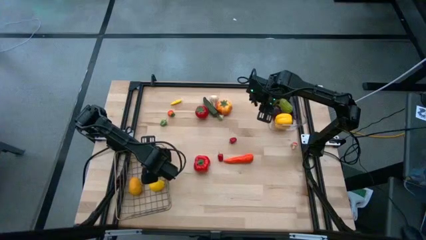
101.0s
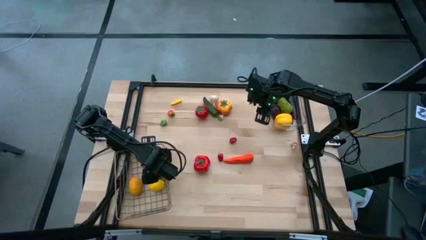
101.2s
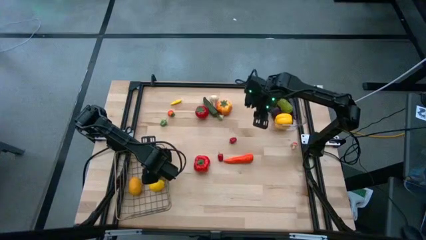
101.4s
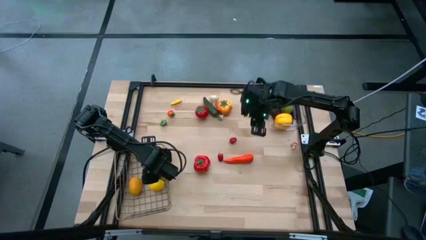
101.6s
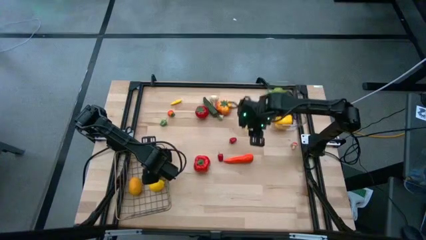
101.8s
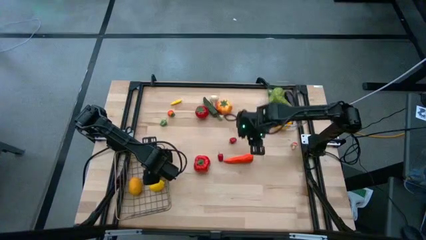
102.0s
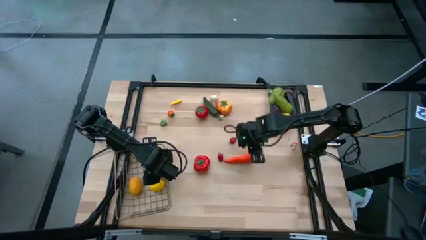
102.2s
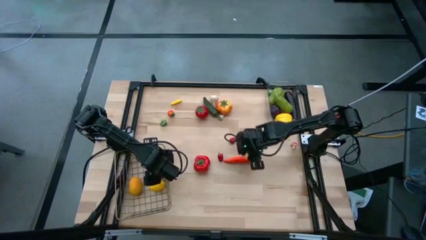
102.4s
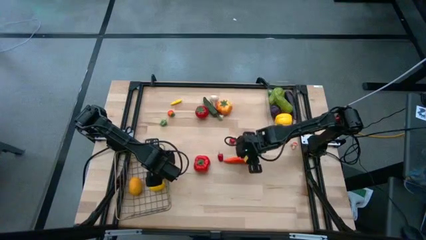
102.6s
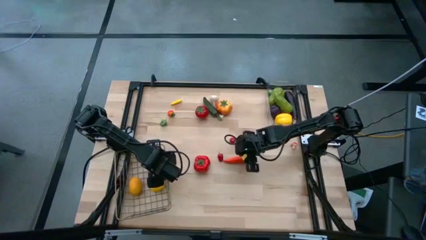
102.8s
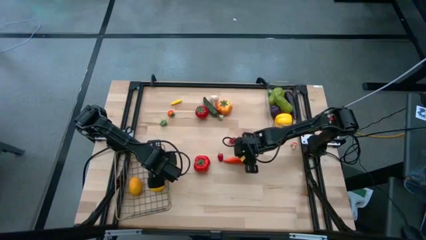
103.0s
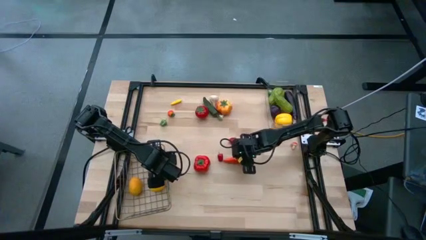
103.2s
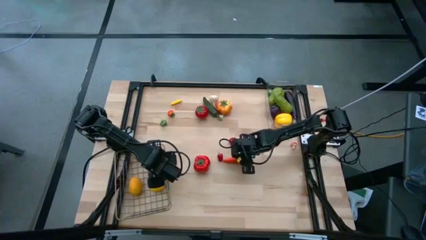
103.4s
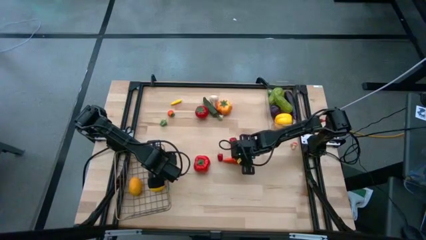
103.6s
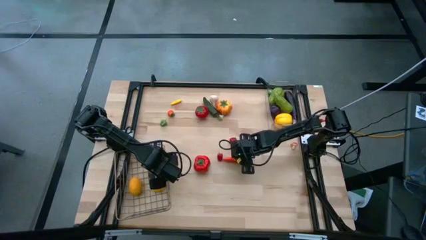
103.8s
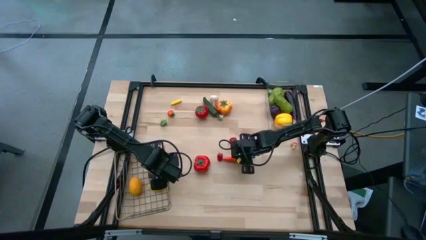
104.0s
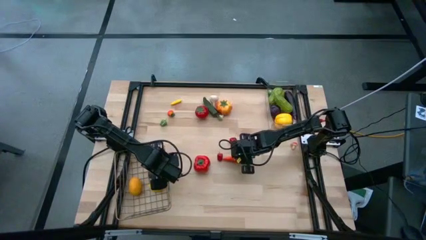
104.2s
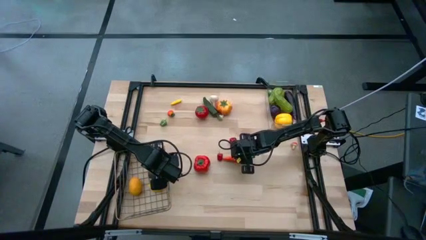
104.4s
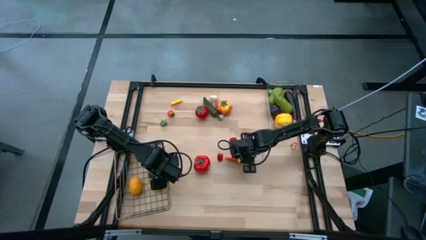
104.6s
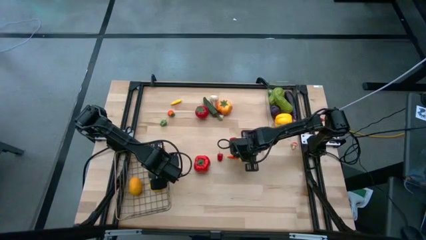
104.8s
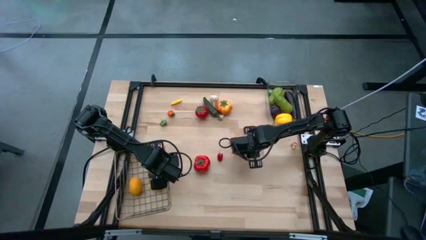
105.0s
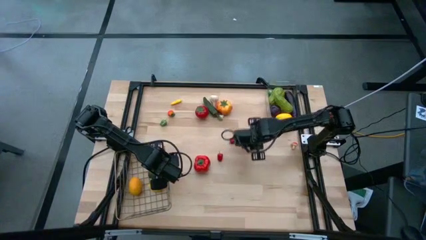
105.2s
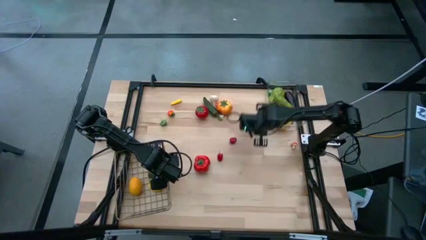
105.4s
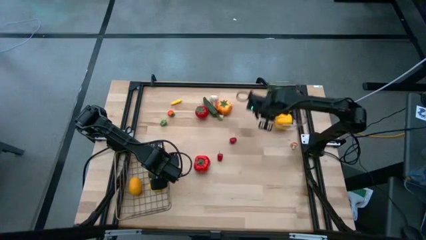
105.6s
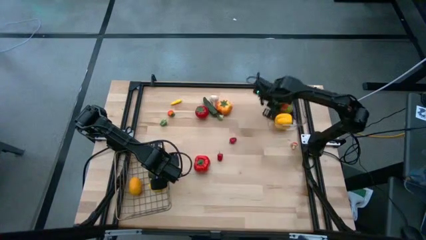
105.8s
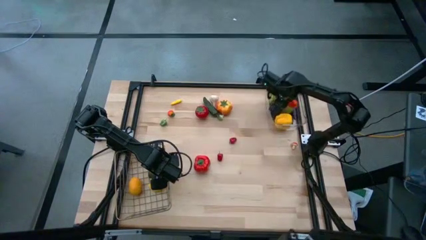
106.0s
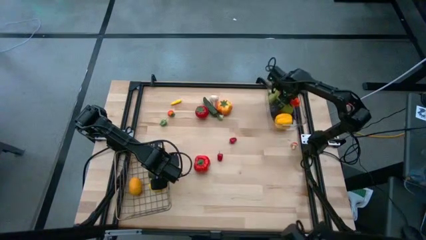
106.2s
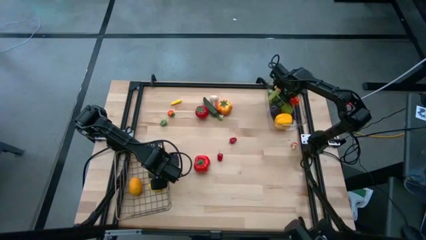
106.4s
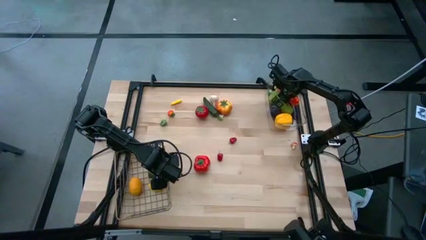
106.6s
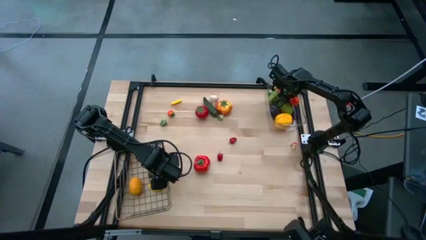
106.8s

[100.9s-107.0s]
Task: Sort produce into baskets
Put the orange carrot into the transparent bin

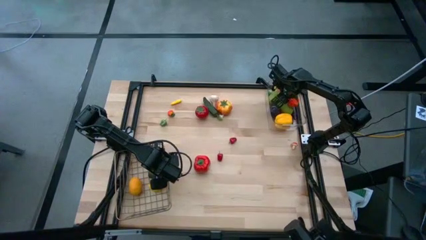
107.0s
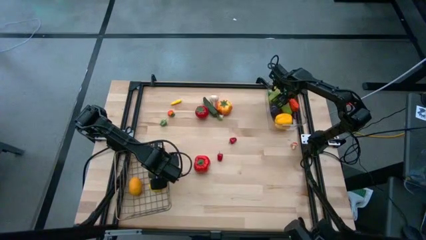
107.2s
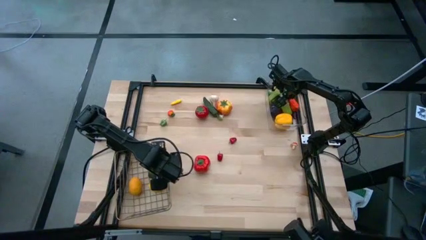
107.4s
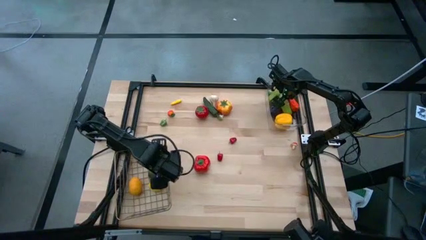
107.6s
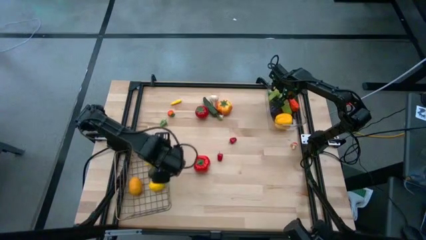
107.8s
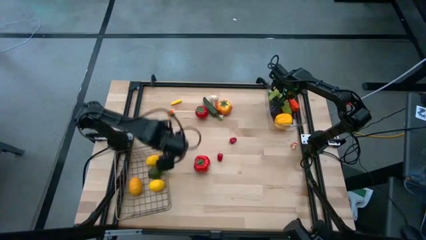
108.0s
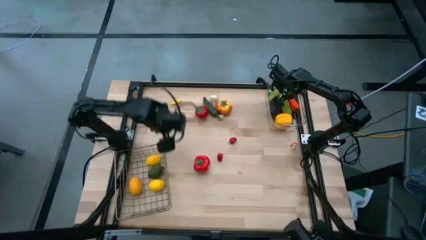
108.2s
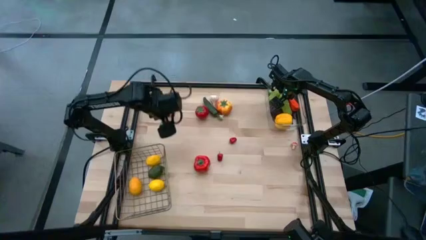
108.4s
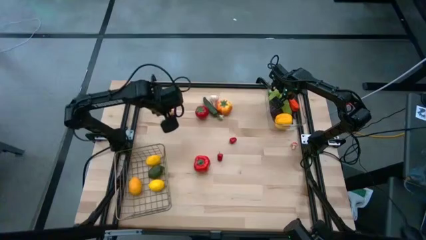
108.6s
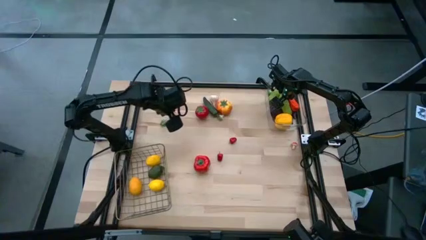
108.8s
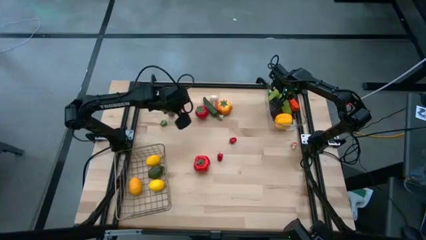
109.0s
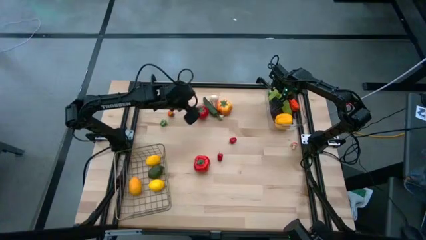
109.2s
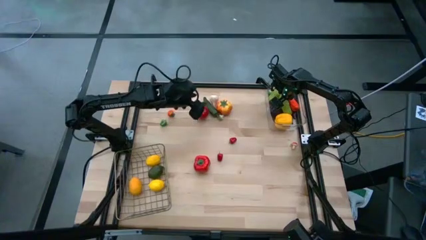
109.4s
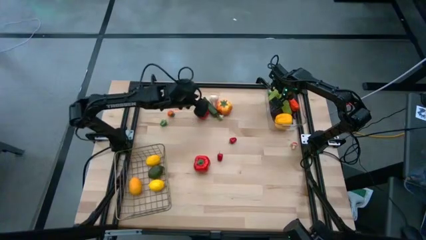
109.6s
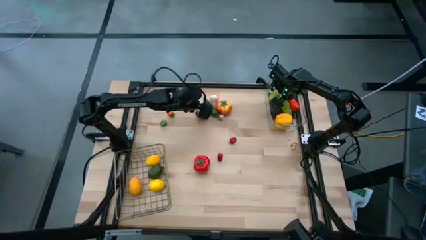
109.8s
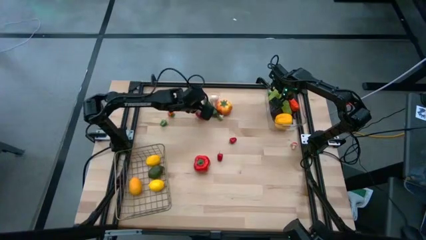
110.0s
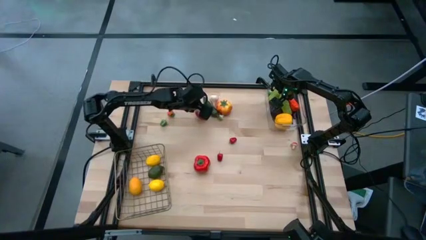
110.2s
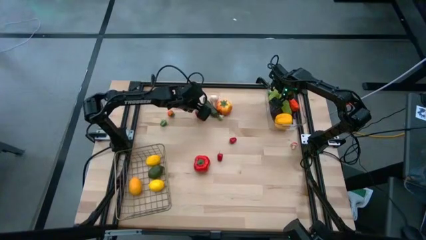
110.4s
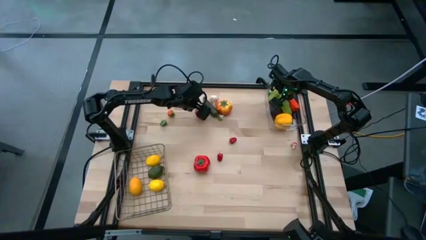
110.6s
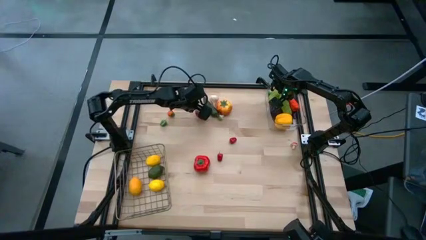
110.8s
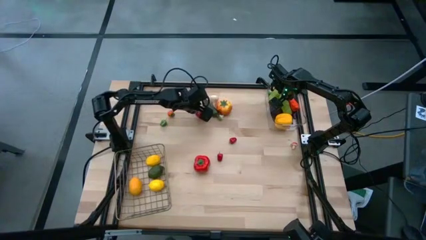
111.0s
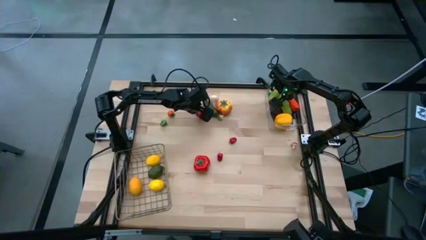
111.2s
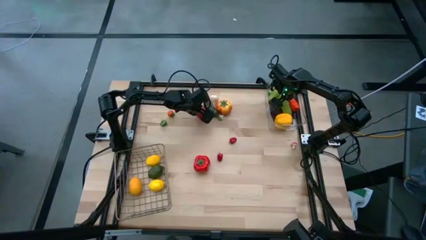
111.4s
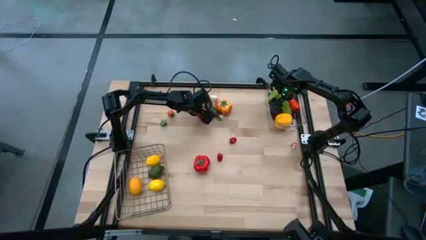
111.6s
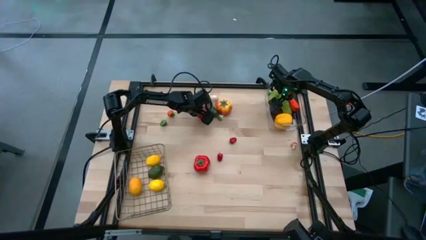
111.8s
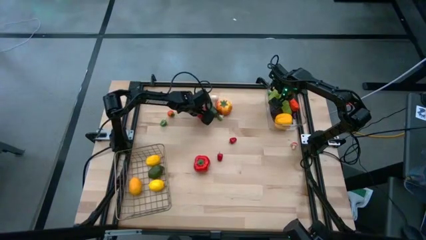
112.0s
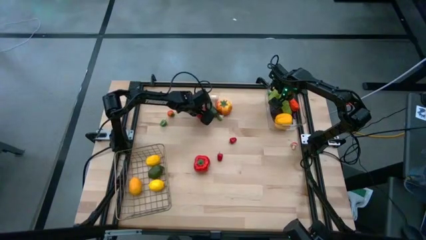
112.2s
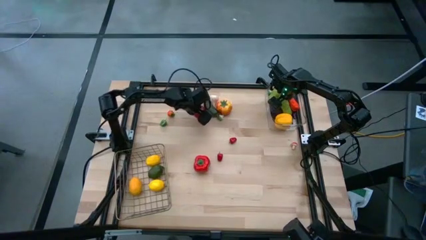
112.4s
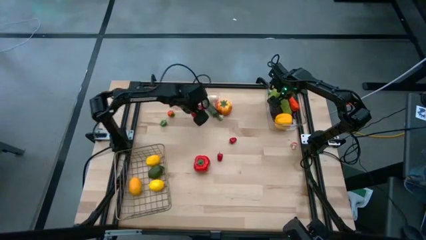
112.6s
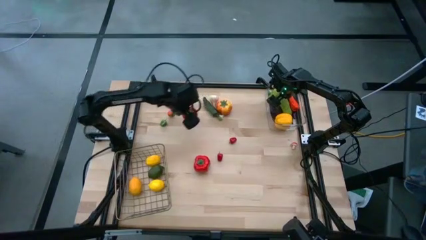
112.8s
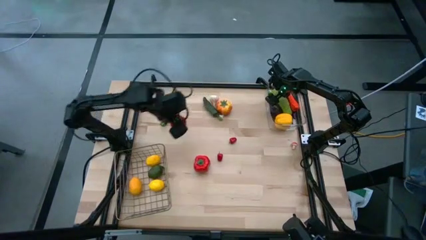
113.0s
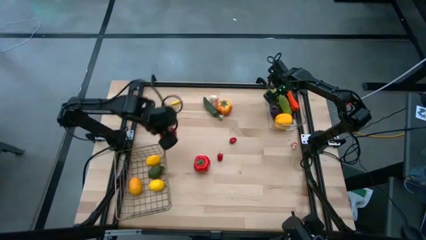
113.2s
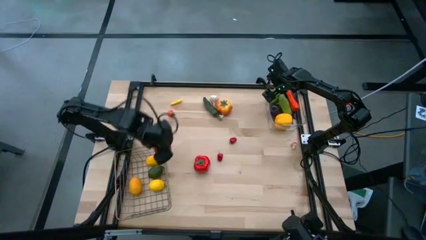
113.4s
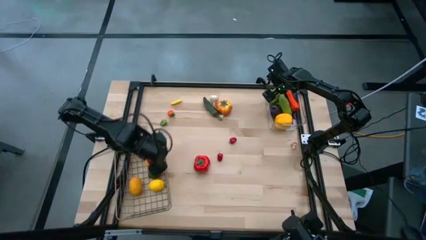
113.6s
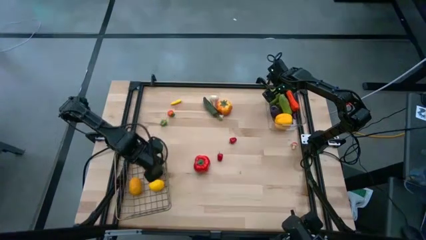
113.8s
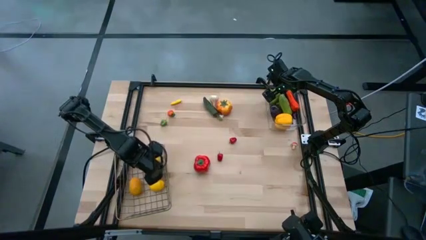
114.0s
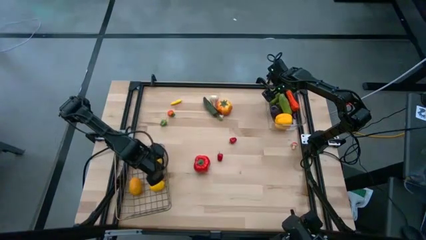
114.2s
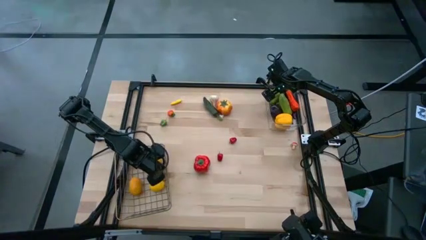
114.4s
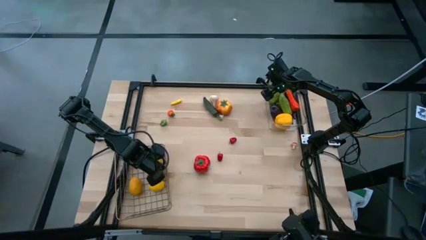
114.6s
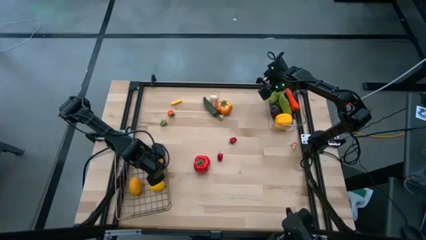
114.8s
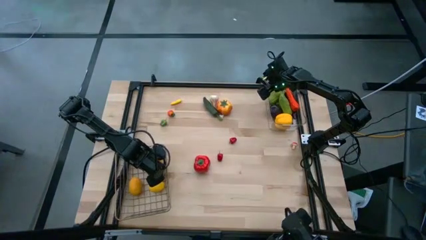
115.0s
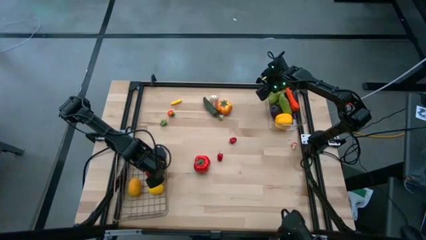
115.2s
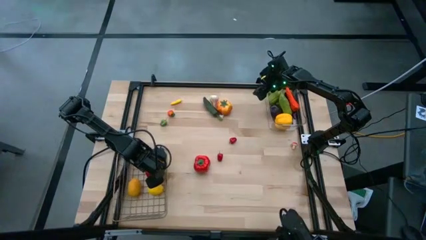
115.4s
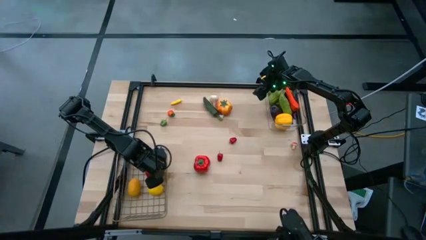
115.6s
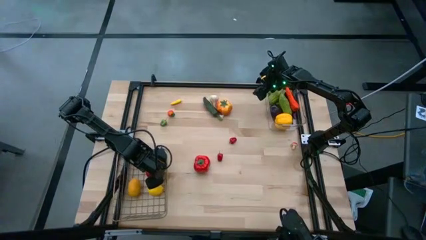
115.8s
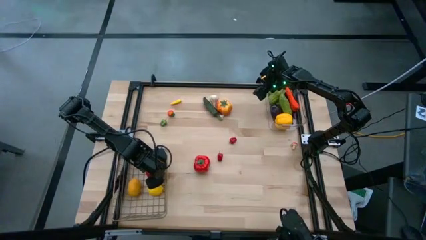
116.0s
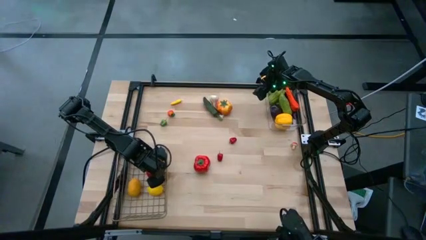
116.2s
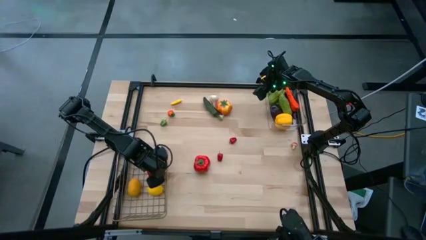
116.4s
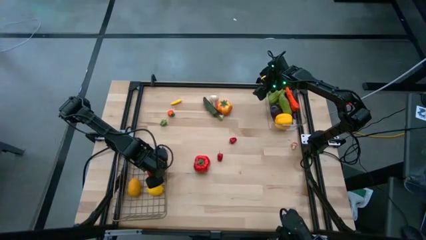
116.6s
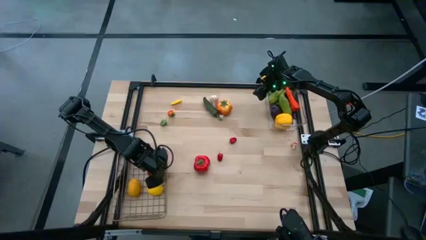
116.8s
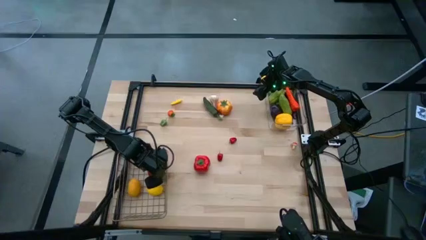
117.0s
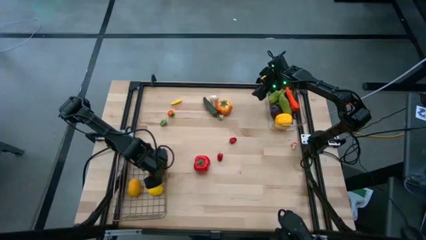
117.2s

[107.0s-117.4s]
Put the red tomato into the wire basket
